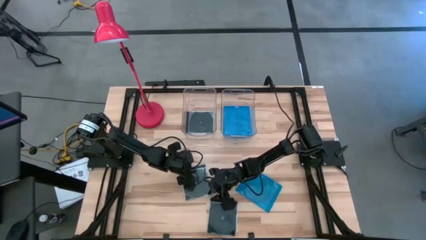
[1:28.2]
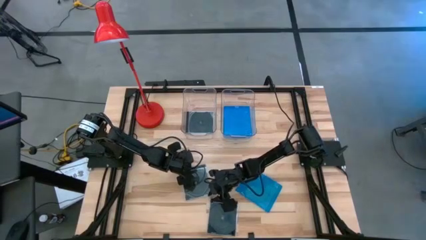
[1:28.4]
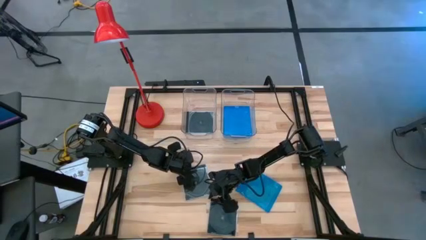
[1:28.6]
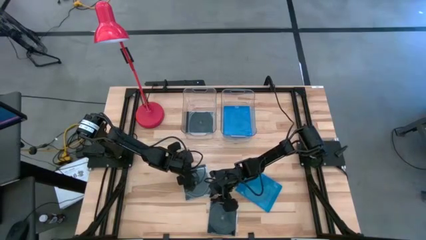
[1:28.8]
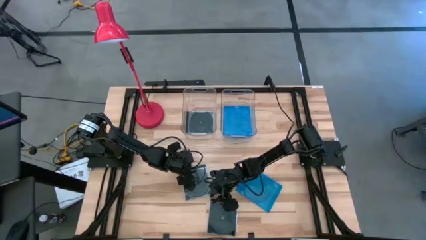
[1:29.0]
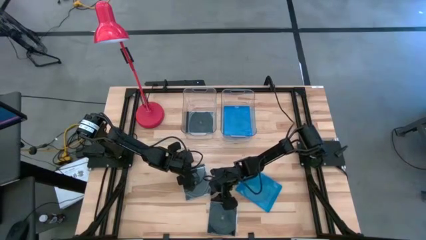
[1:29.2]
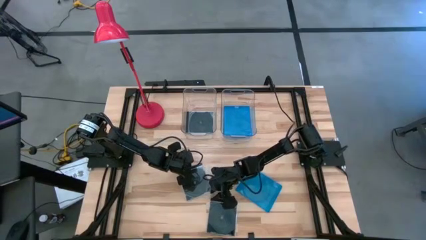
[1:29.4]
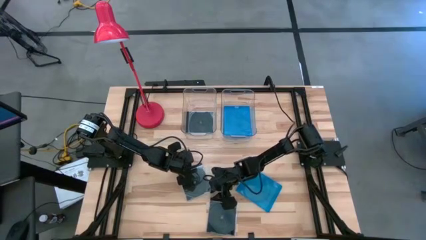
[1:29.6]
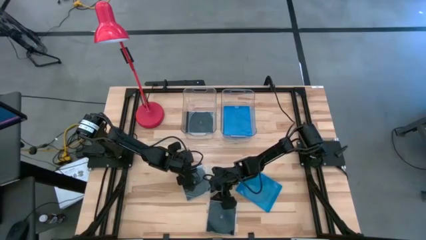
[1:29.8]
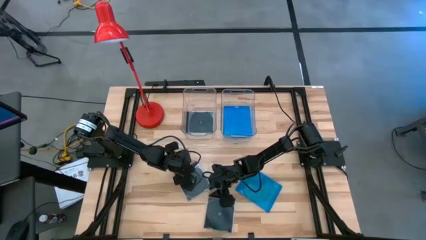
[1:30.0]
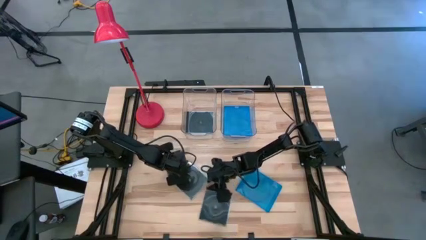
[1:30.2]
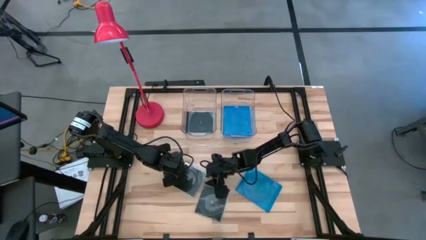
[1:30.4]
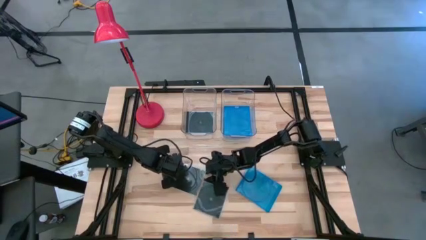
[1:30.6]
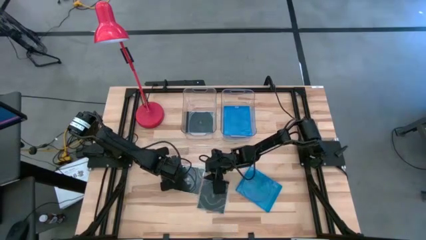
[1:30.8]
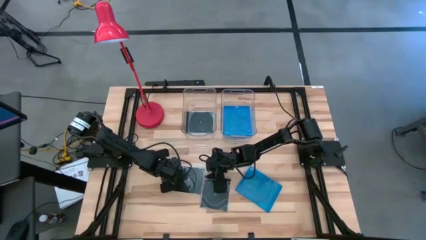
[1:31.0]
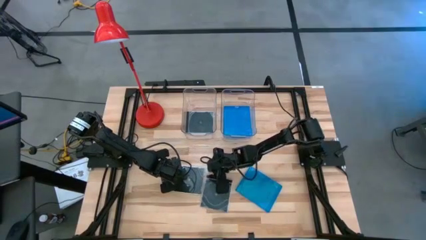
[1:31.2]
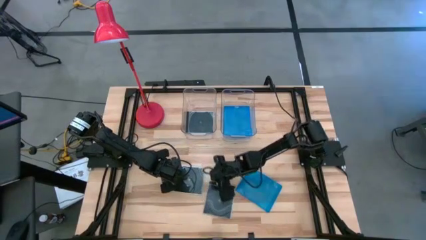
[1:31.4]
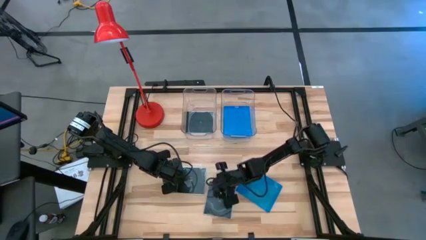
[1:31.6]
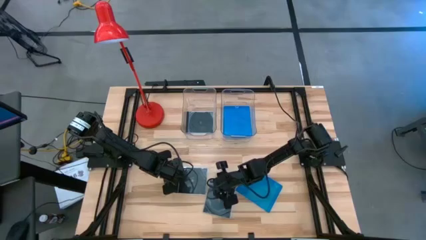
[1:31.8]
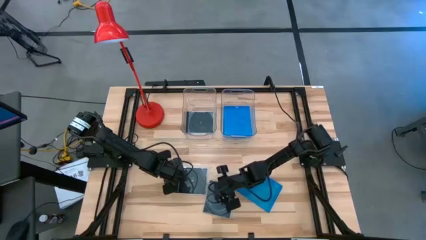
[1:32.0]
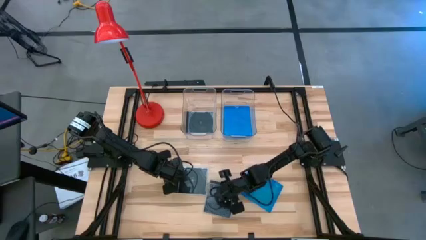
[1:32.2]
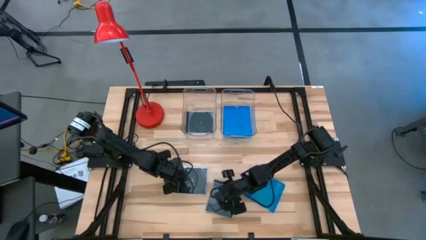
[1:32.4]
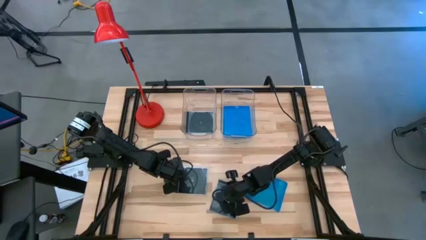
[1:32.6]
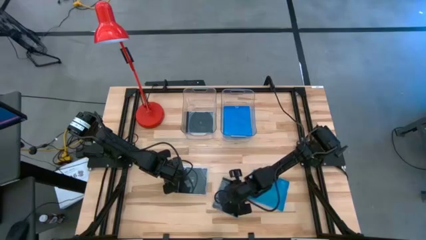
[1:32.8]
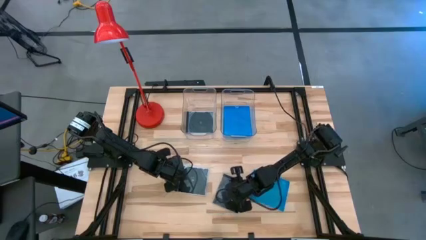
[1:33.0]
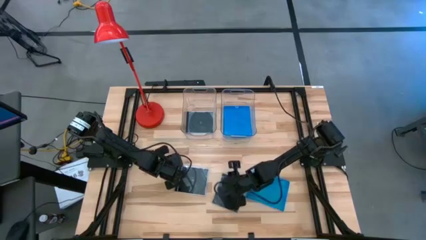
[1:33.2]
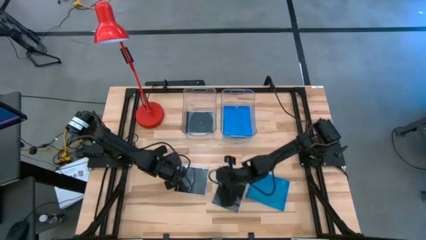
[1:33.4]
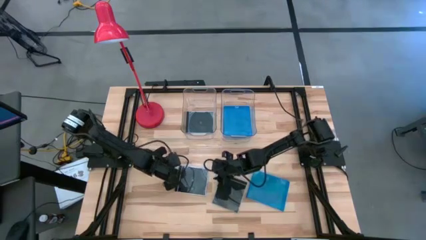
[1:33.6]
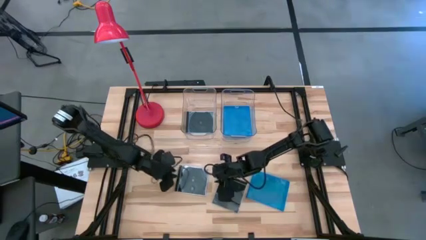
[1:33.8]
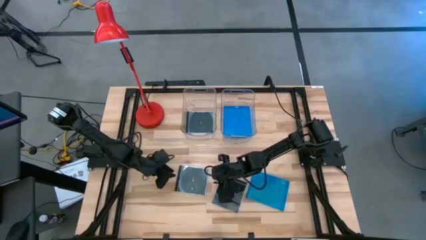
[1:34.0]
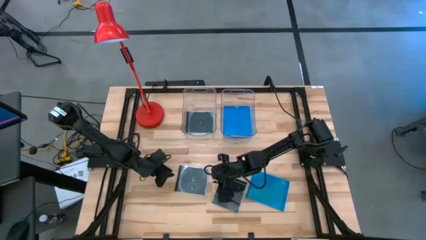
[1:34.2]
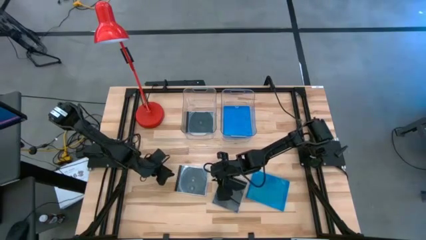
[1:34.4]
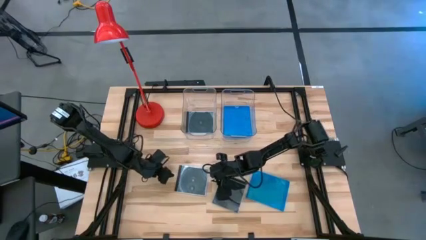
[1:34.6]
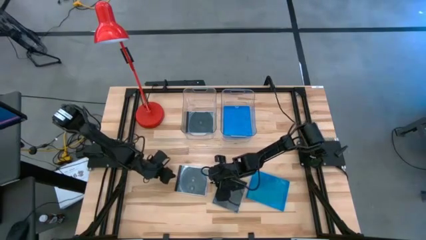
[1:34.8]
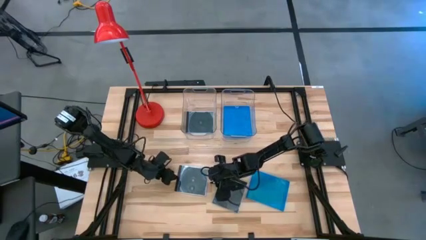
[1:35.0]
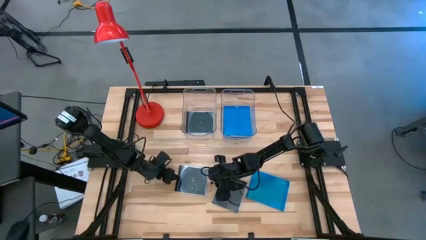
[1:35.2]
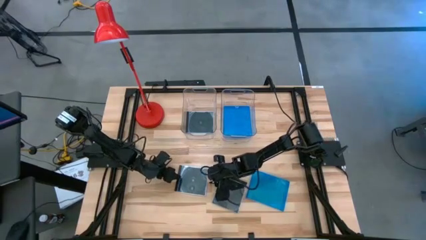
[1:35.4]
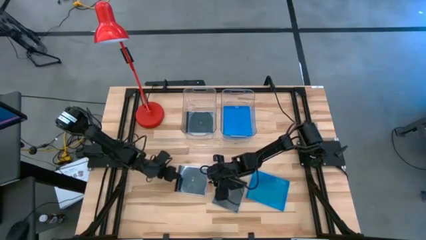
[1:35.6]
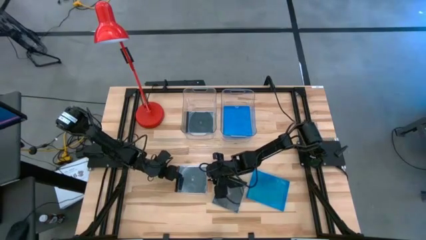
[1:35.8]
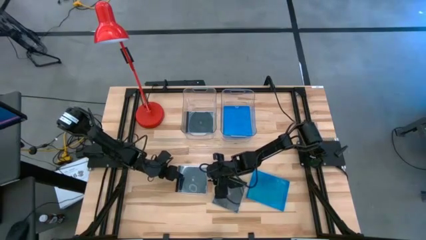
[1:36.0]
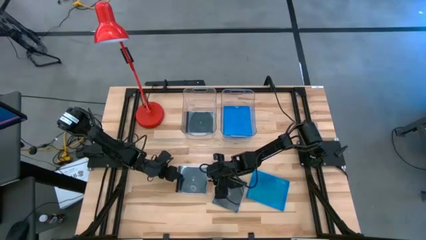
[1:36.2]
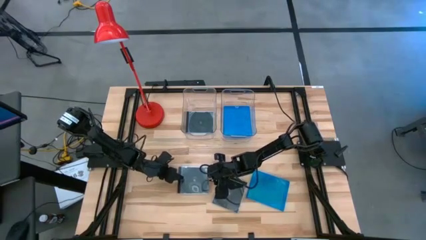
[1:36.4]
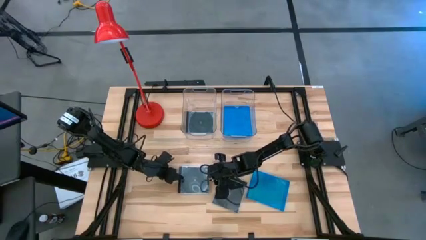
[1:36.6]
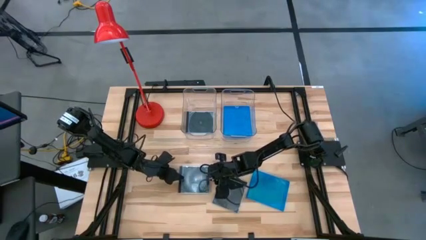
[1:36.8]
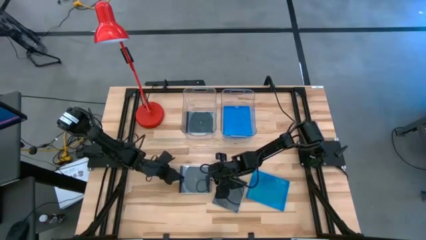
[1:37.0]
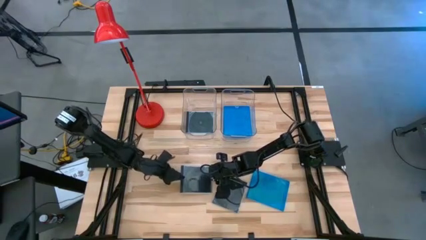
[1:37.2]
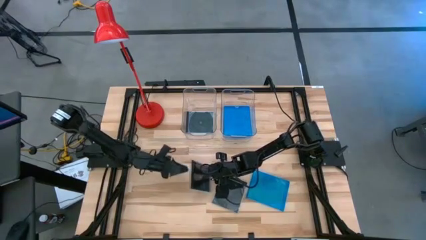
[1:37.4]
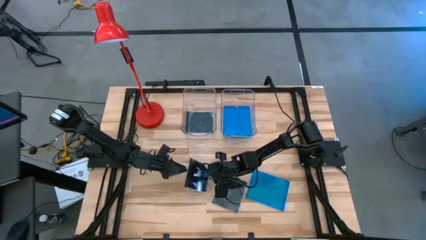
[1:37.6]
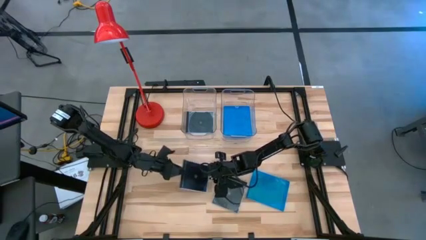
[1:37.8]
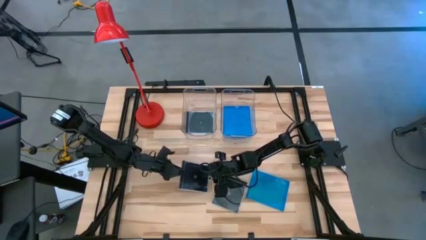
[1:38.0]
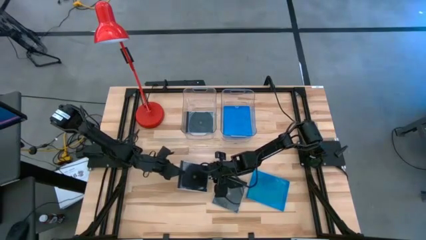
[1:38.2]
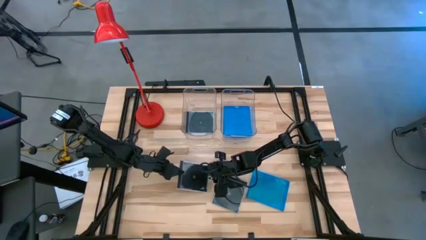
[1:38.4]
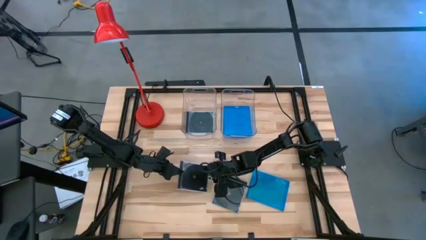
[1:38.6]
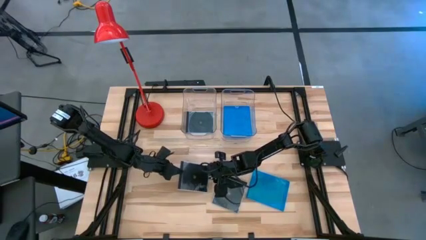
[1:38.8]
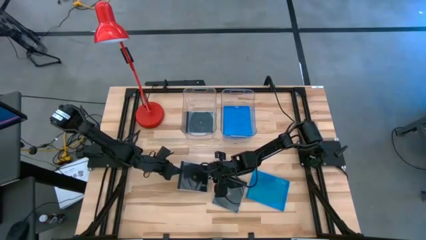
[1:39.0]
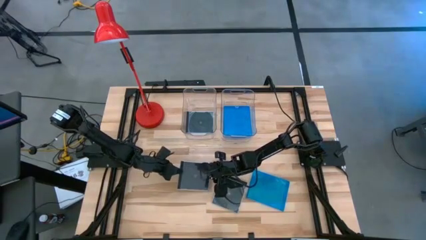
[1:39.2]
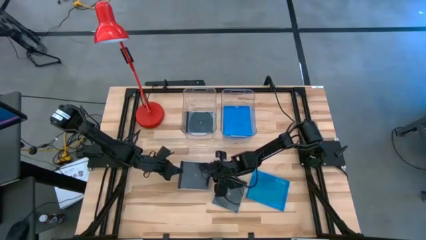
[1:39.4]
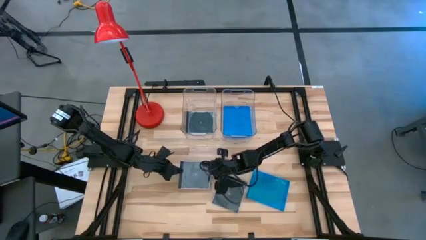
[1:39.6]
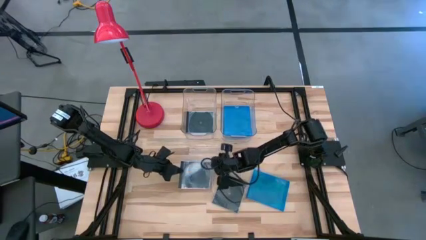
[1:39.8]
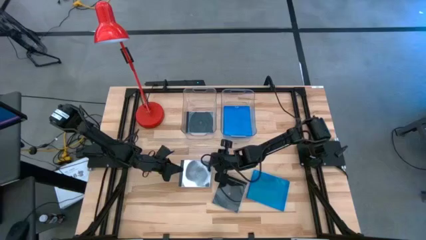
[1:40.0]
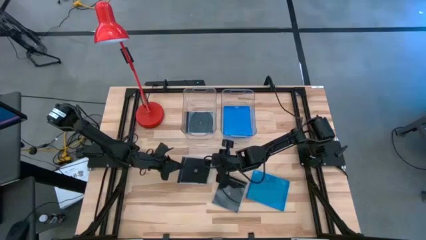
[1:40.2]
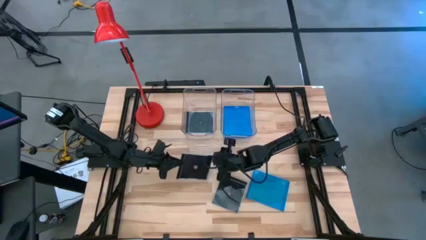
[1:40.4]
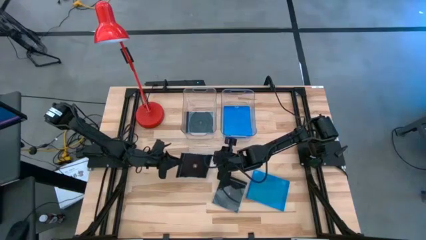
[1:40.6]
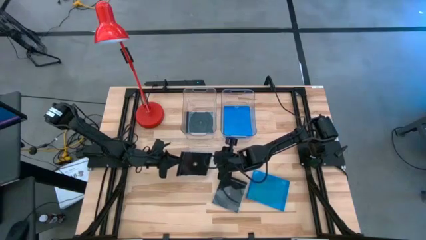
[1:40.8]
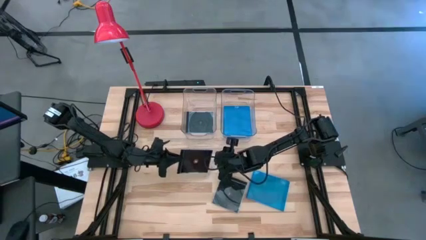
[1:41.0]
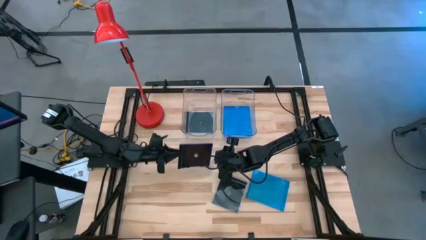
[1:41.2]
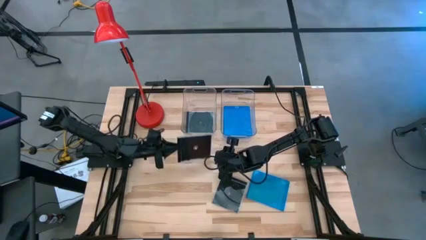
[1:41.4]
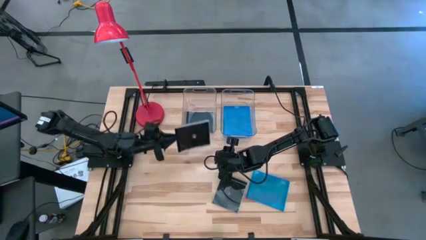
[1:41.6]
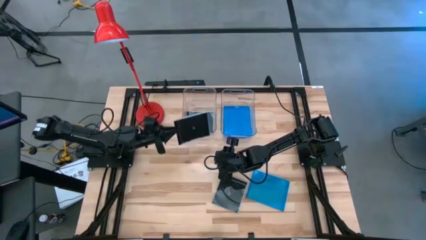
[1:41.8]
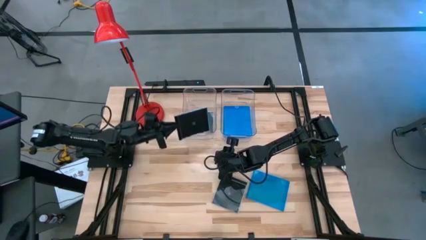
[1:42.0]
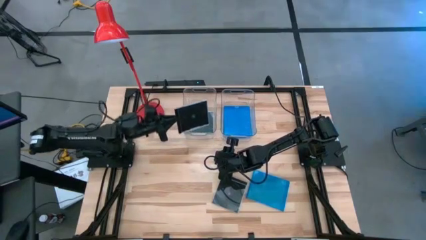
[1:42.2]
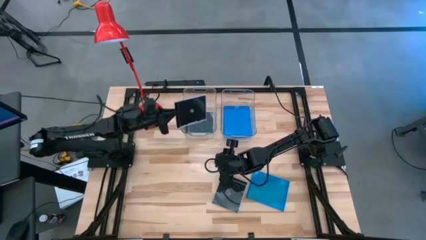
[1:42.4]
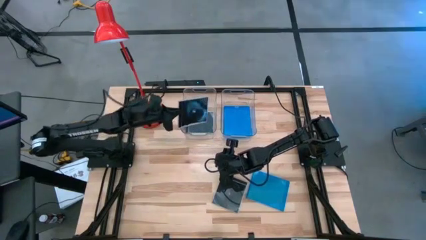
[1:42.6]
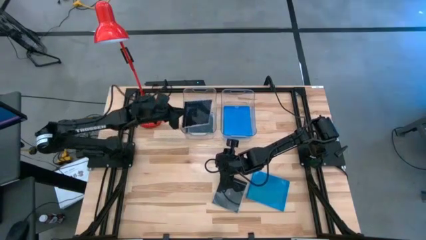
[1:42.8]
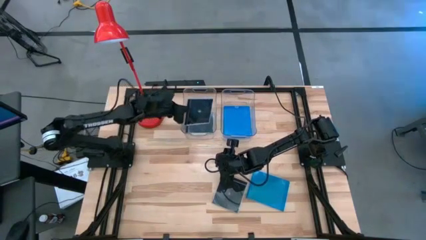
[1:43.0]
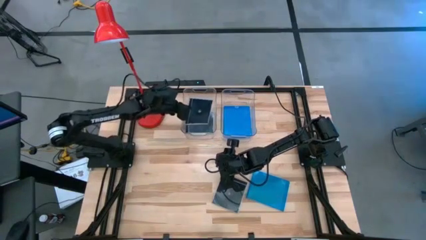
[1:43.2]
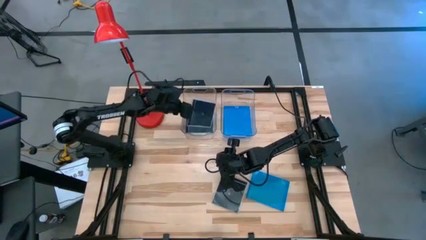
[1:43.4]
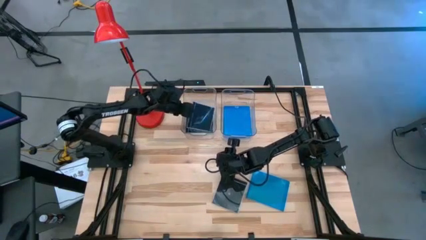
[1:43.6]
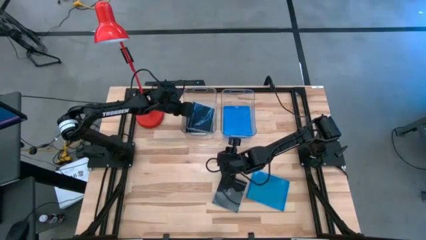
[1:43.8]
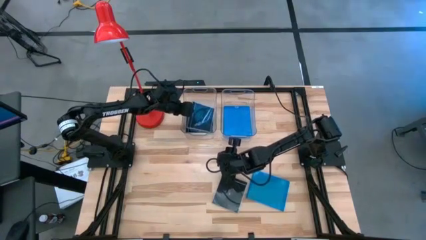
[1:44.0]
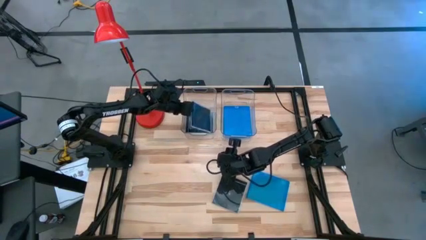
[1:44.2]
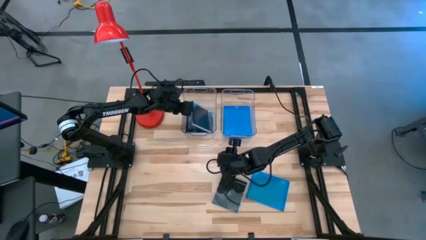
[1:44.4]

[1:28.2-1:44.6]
Task: Pick & place jewel cases by type
Put the top black cd case into the left transparent bin

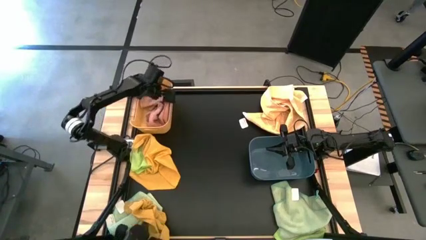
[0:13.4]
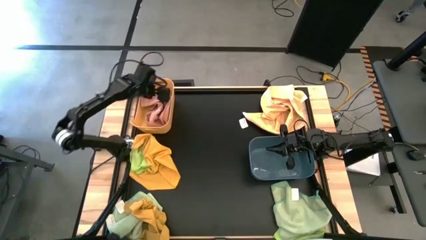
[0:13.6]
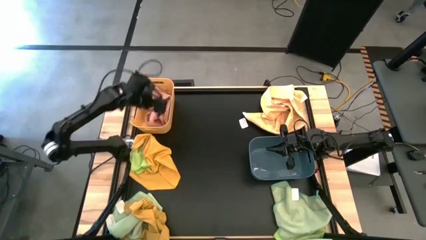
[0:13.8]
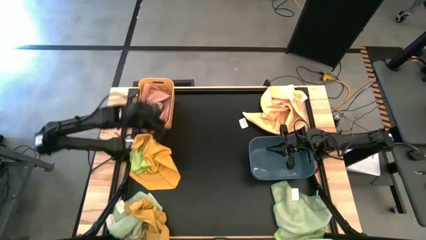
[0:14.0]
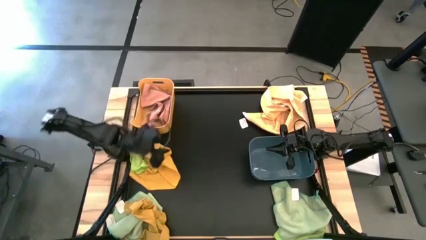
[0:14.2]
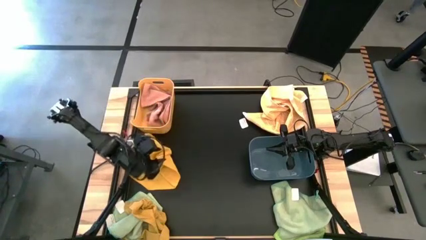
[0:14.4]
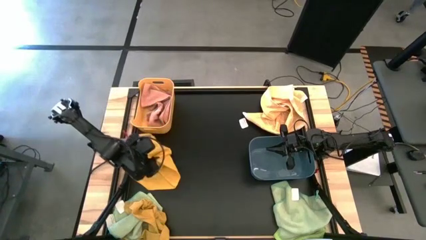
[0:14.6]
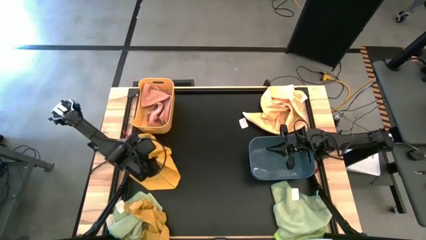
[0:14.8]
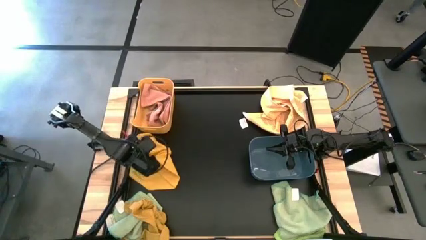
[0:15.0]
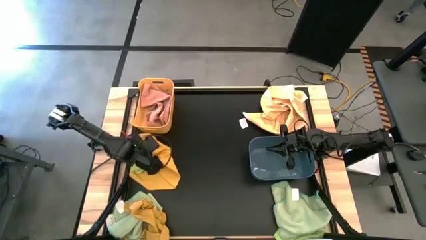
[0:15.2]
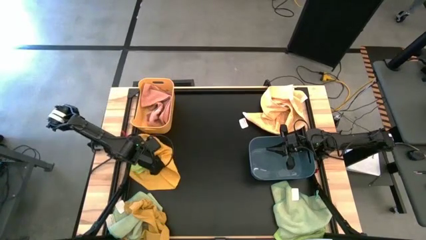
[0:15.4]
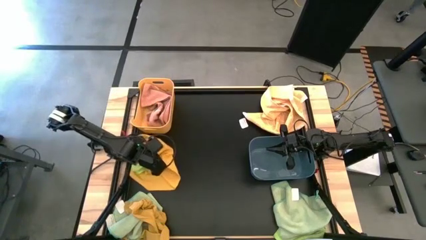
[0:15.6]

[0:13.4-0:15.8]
Task: Sort towels by color in basket
Put the top yellow microfiber cloth into the yellow bin
